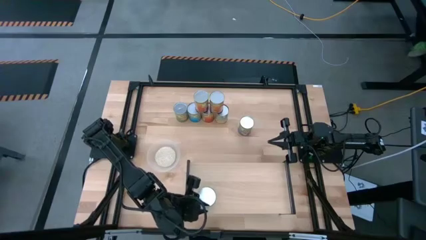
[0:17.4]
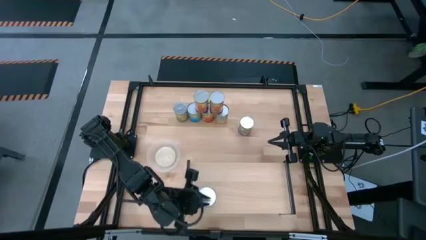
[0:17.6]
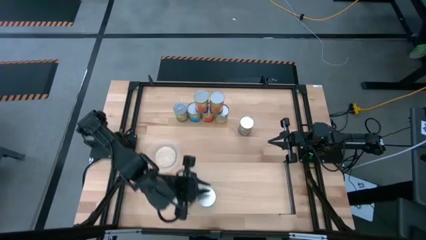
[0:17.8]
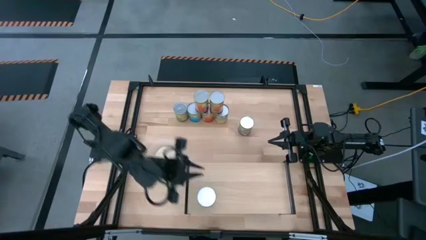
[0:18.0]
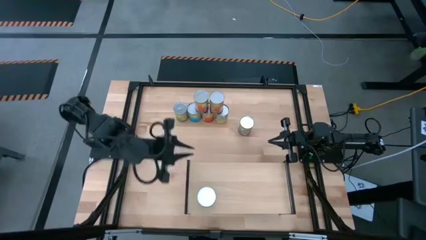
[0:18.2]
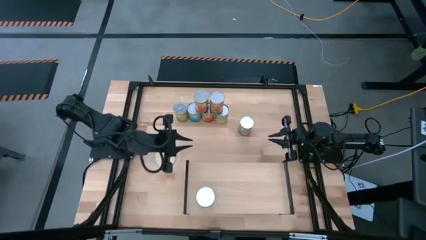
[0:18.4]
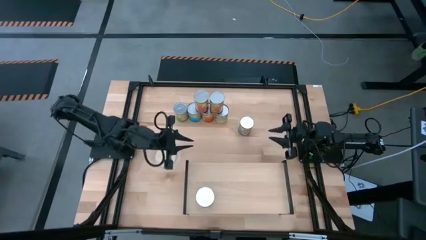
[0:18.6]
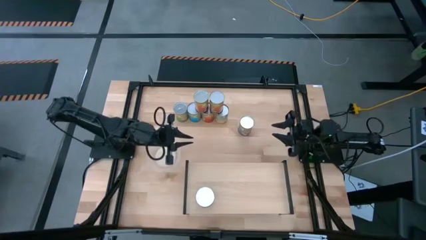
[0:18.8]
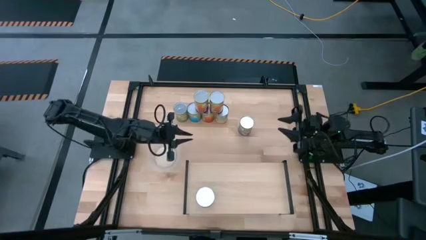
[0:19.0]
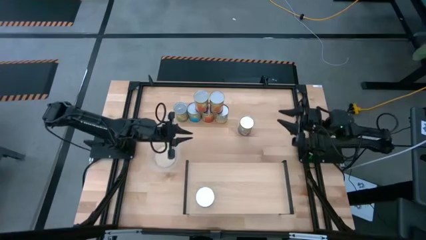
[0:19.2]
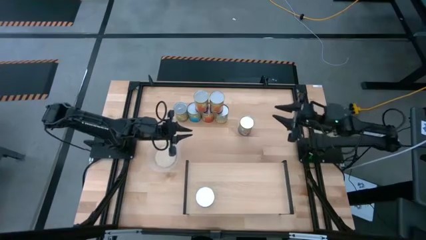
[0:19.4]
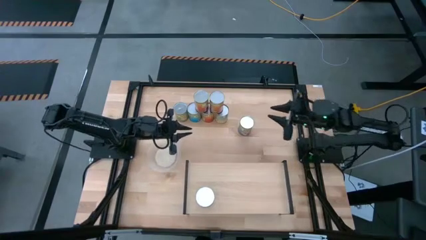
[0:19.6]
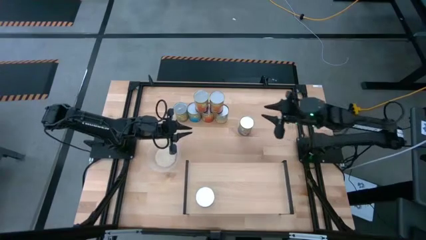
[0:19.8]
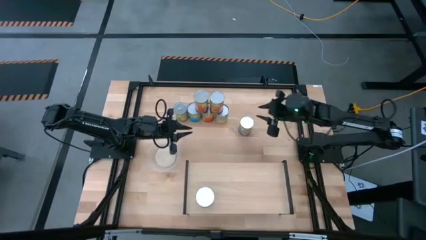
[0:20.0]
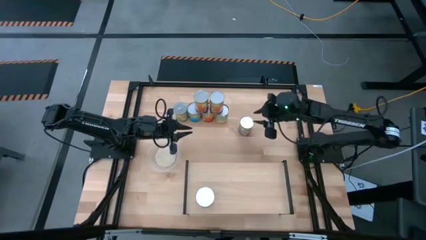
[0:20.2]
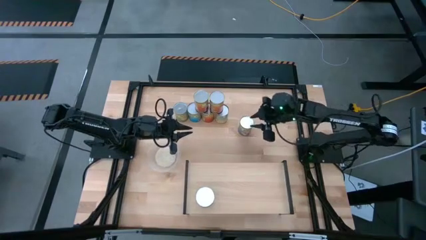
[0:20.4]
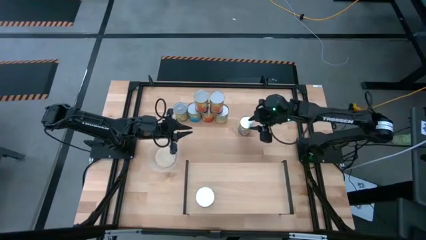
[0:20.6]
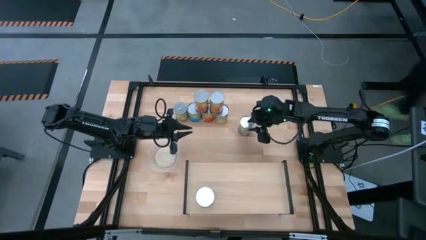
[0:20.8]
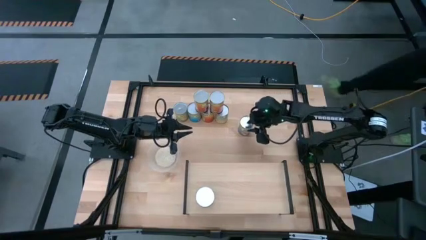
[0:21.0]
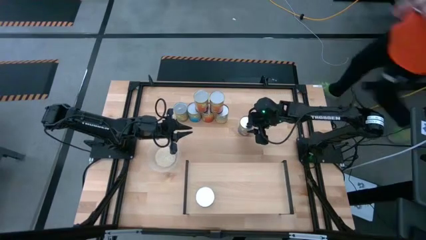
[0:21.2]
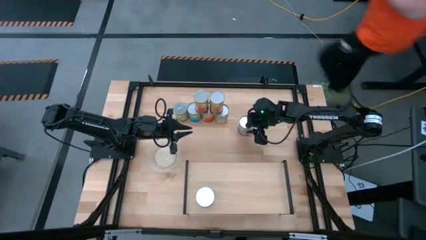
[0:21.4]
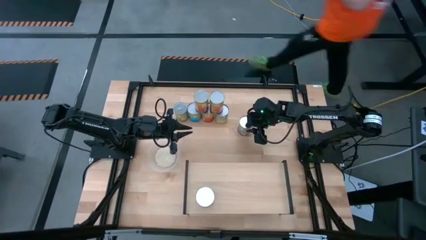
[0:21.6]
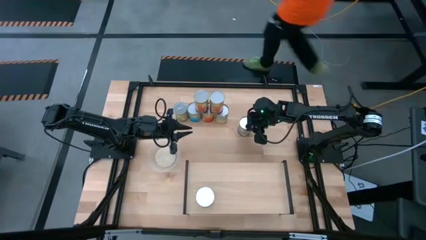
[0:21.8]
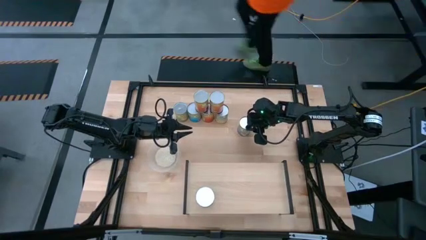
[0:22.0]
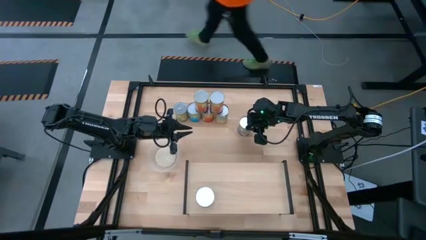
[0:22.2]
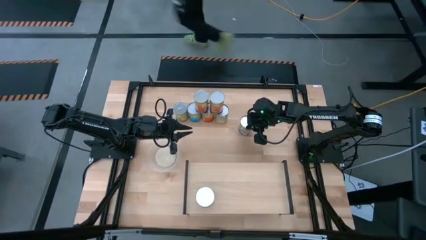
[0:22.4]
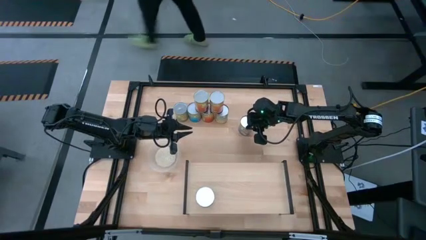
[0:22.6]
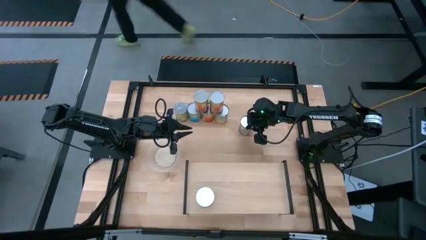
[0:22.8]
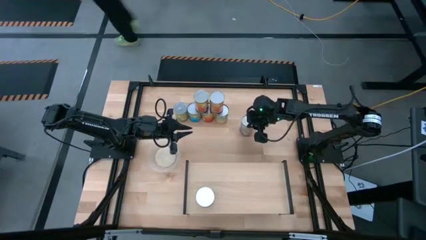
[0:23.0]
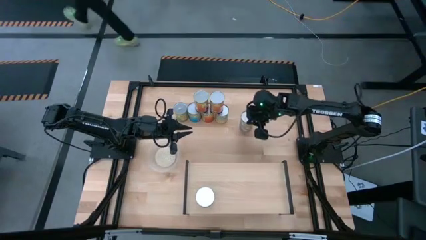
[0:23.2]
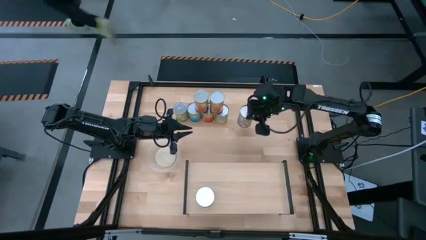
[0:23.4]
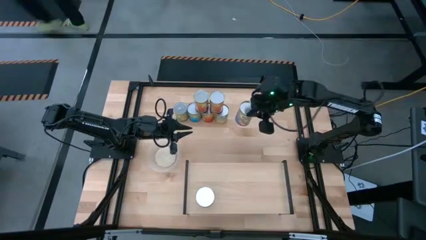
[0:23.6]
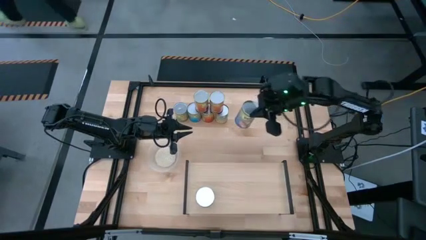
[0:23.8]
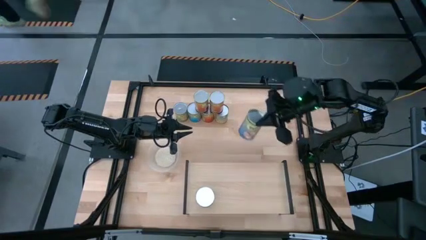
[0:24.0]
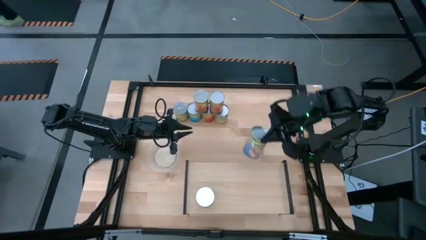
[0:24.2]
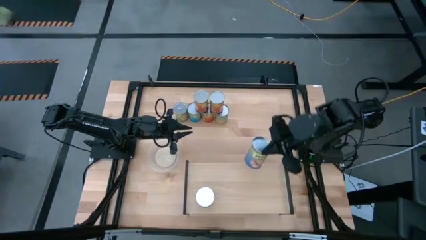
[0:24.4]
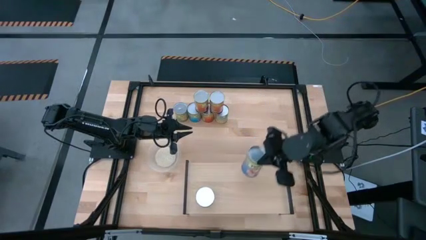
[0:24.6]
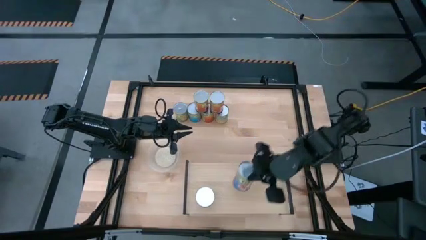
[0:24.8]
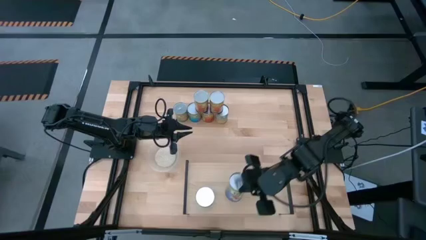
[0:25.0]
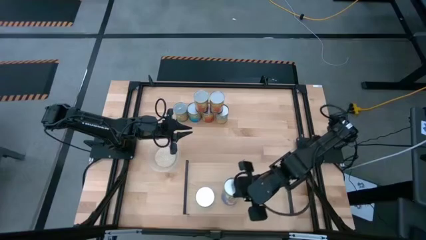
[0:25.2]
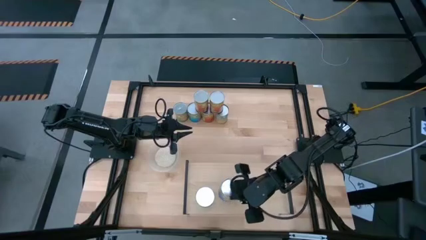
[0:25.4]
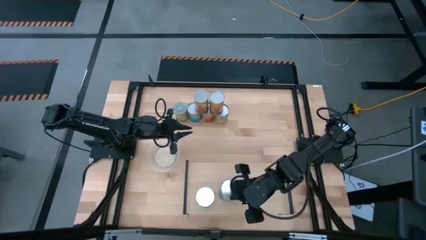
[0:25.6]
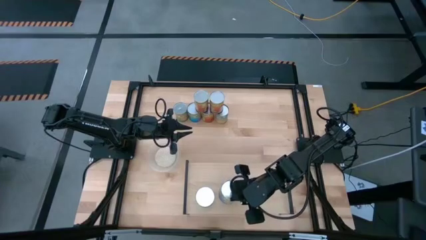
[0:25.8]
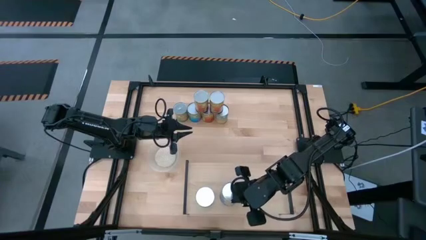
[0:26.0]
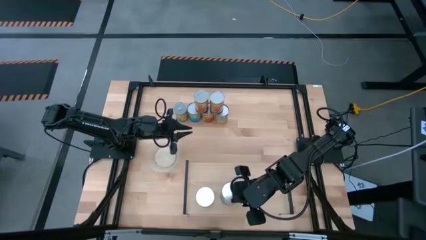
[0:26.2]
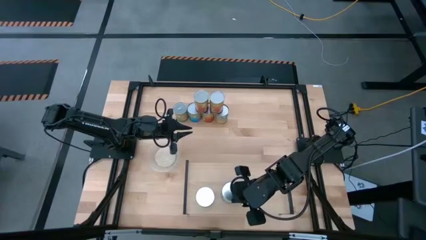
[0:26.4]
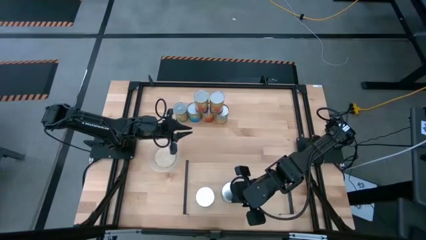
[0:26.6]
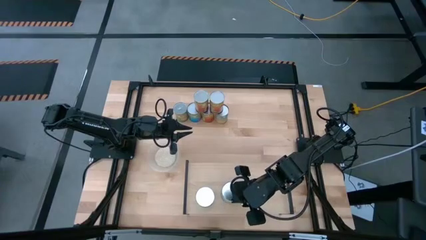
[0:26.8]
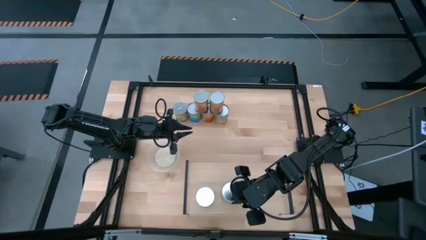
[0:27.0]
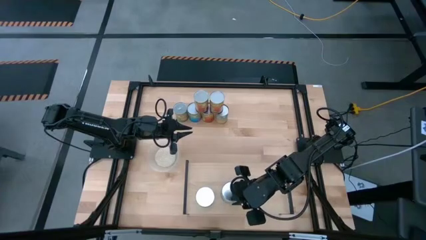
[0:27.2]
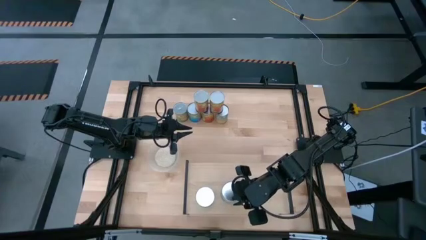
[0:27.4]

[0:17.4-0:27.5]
Task: Pick and place cans onto a shelf
Put the canned peaches on the shelf
